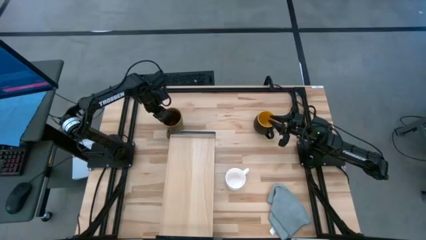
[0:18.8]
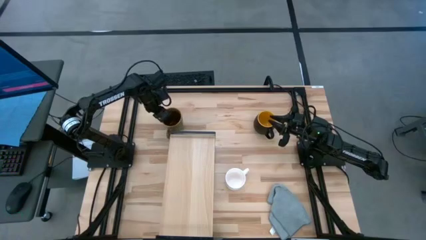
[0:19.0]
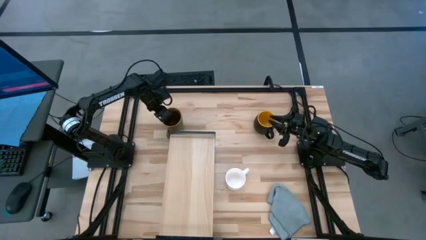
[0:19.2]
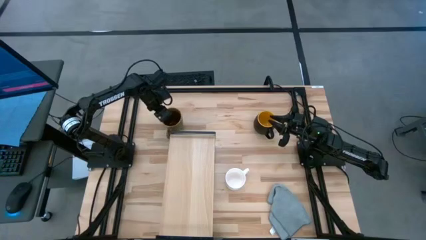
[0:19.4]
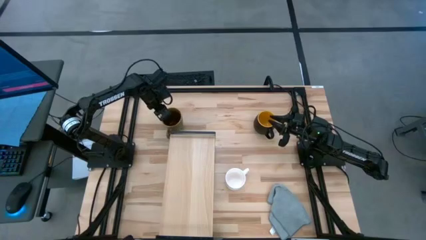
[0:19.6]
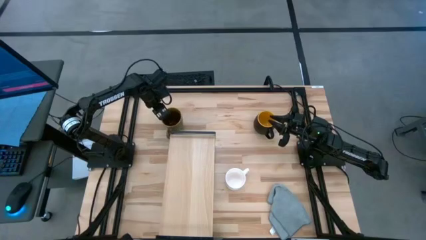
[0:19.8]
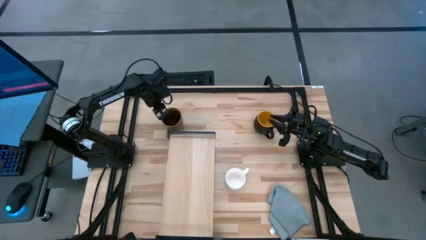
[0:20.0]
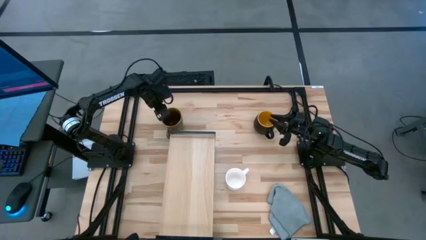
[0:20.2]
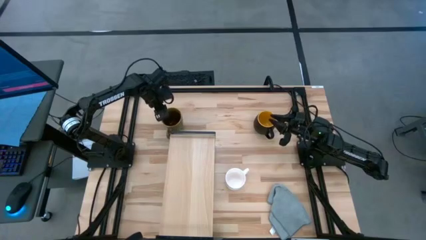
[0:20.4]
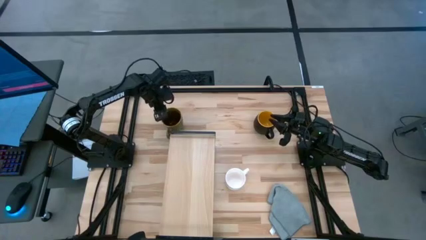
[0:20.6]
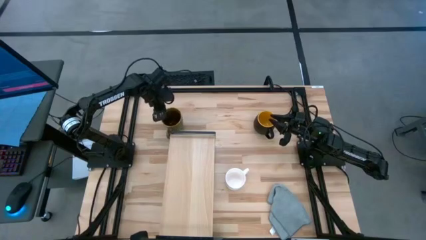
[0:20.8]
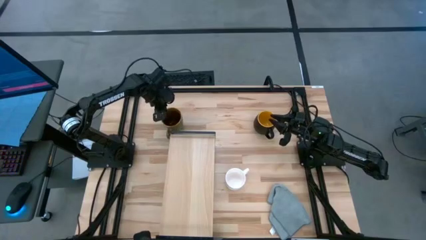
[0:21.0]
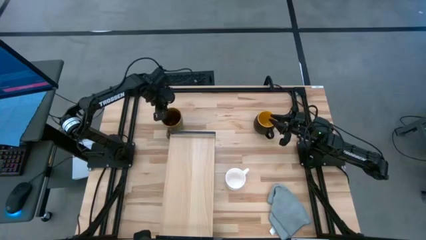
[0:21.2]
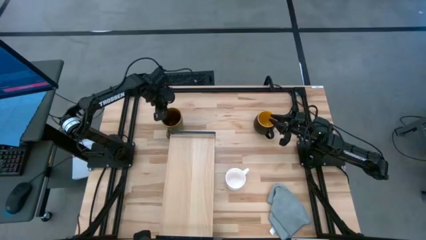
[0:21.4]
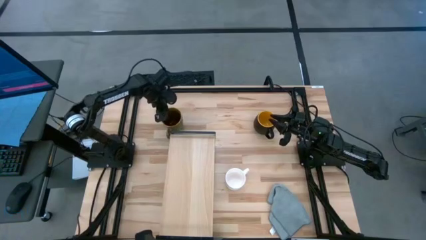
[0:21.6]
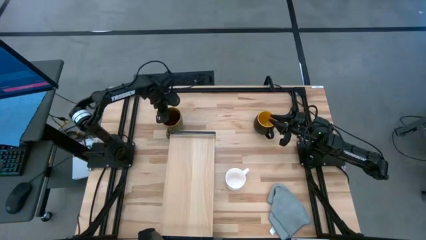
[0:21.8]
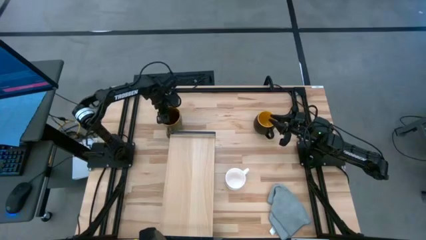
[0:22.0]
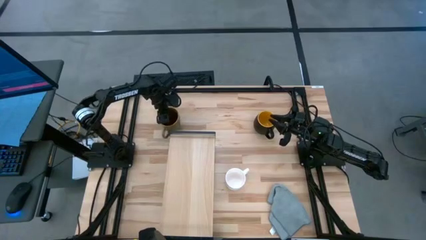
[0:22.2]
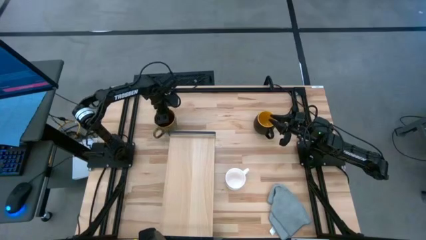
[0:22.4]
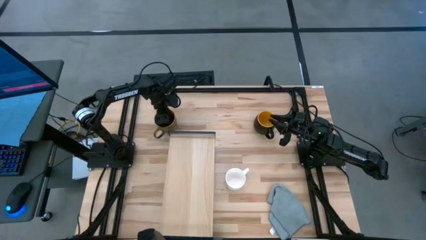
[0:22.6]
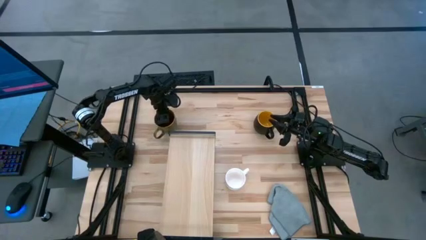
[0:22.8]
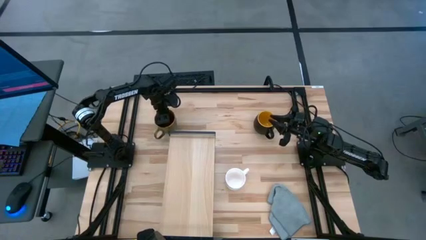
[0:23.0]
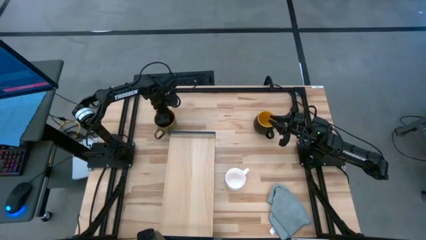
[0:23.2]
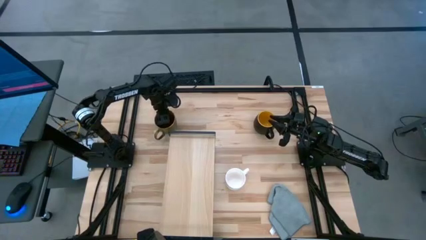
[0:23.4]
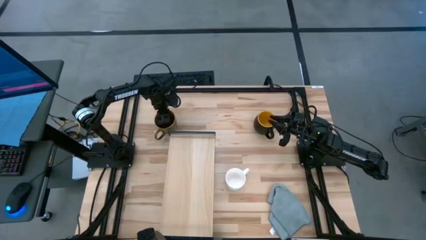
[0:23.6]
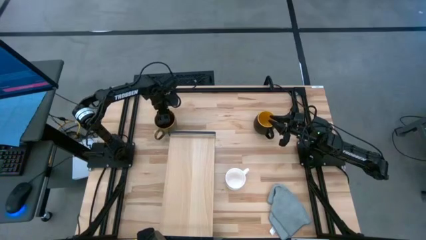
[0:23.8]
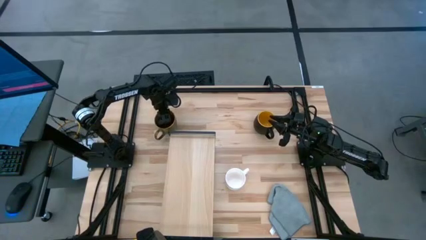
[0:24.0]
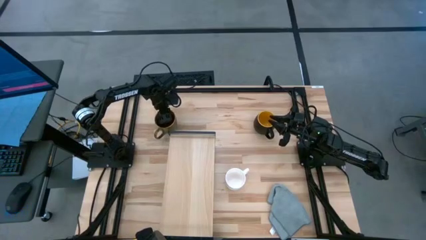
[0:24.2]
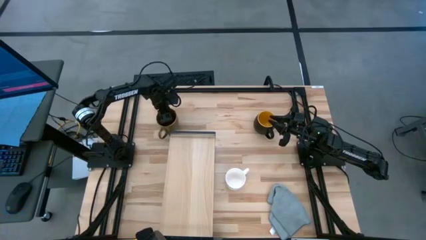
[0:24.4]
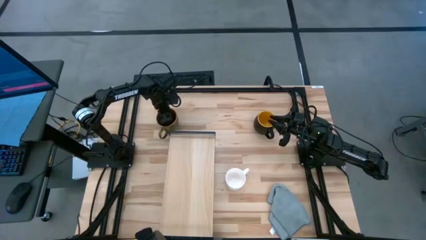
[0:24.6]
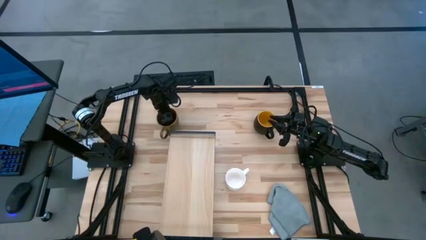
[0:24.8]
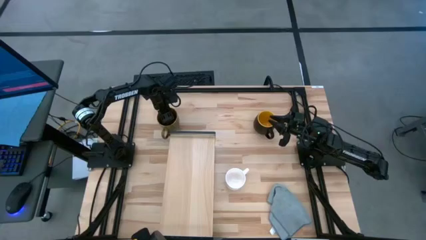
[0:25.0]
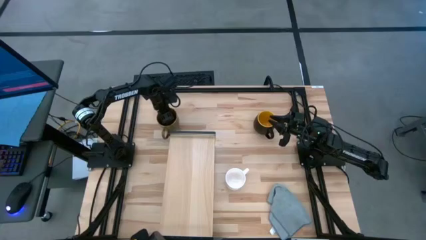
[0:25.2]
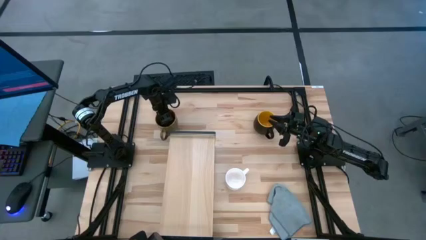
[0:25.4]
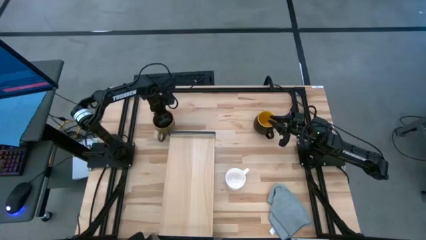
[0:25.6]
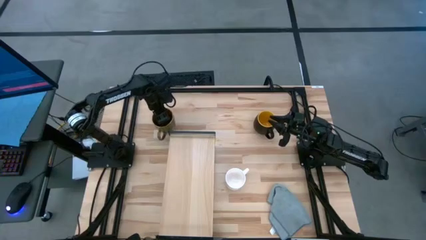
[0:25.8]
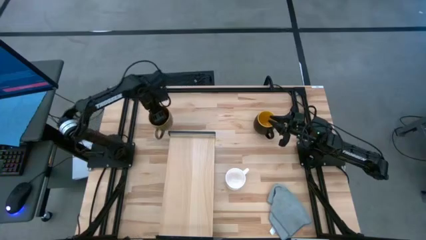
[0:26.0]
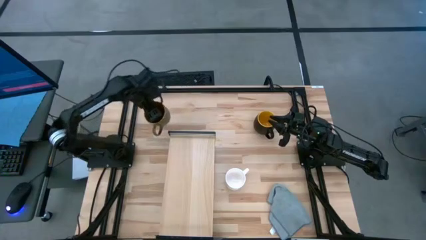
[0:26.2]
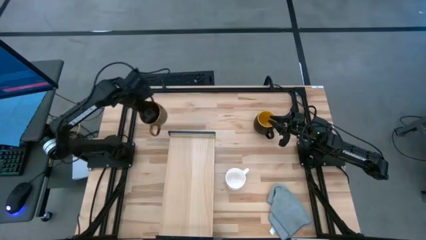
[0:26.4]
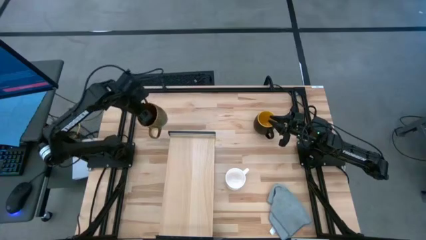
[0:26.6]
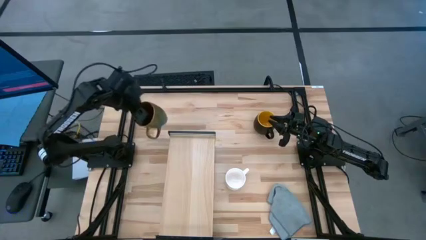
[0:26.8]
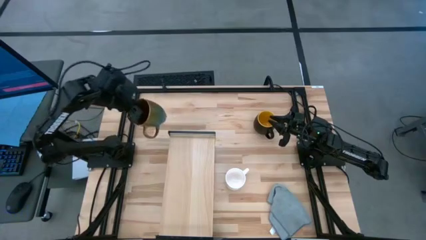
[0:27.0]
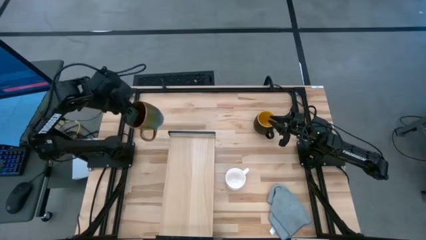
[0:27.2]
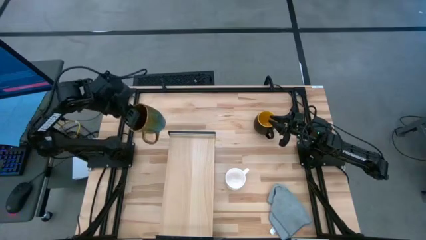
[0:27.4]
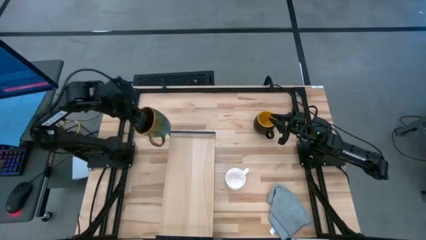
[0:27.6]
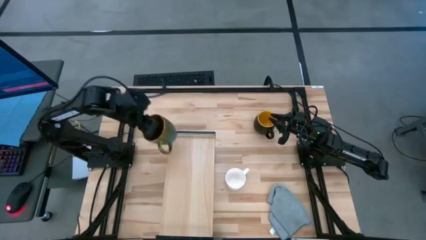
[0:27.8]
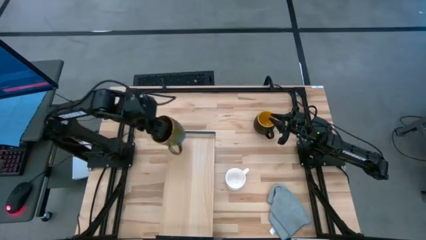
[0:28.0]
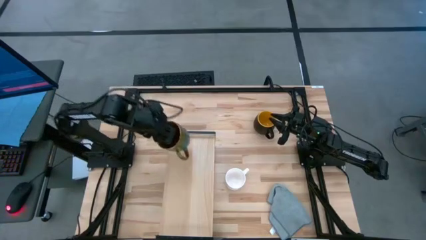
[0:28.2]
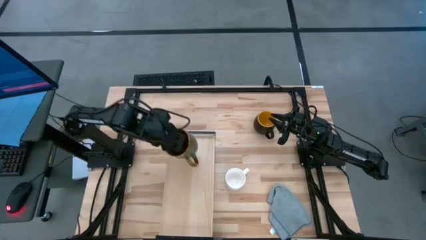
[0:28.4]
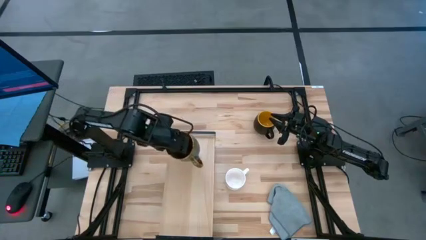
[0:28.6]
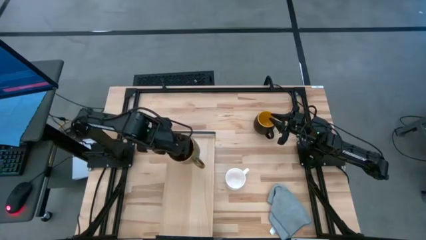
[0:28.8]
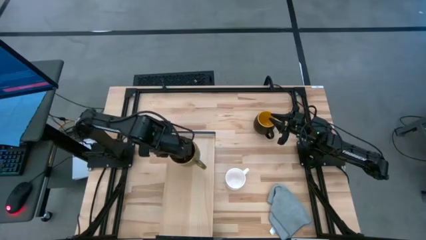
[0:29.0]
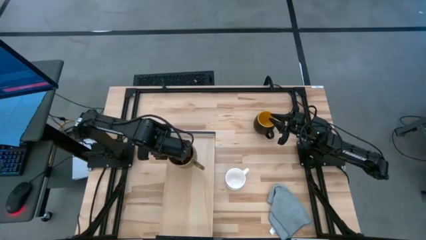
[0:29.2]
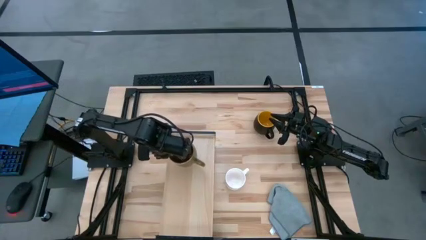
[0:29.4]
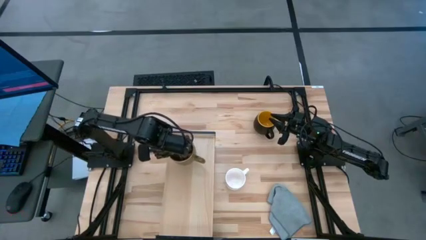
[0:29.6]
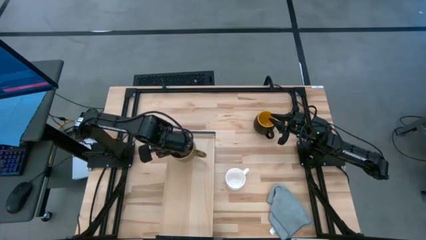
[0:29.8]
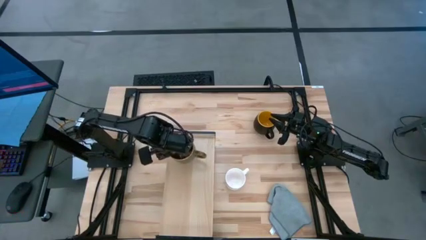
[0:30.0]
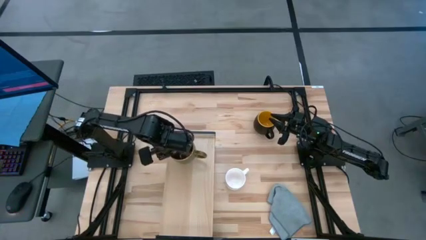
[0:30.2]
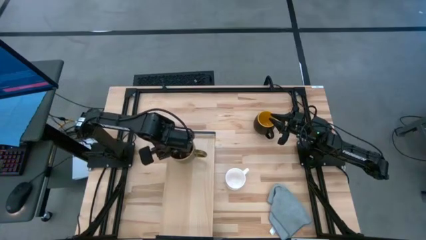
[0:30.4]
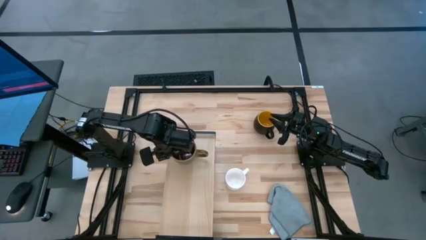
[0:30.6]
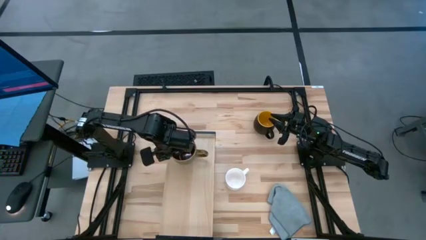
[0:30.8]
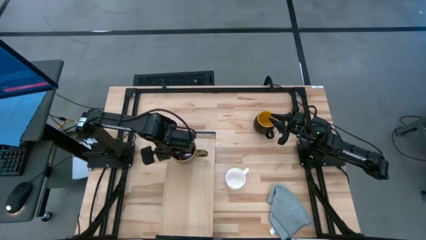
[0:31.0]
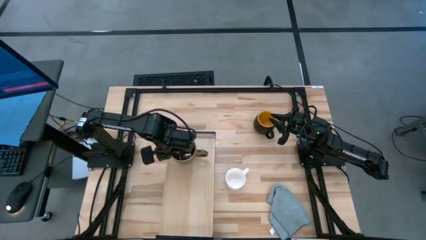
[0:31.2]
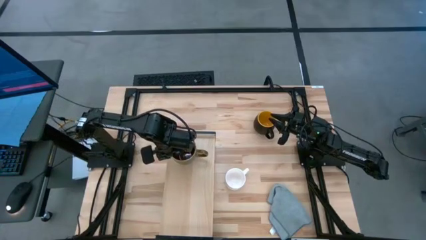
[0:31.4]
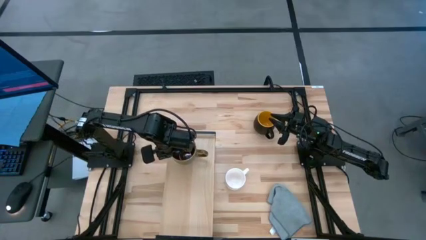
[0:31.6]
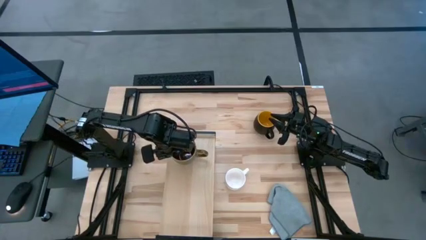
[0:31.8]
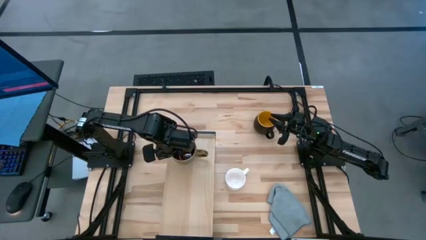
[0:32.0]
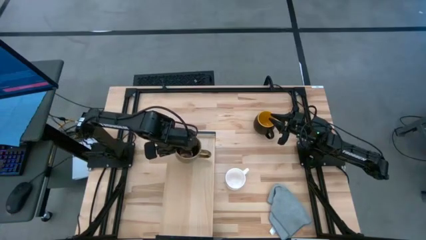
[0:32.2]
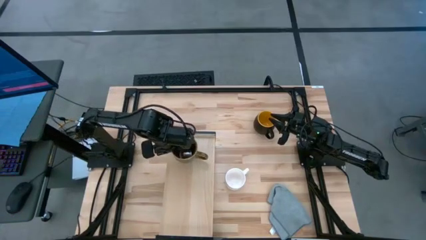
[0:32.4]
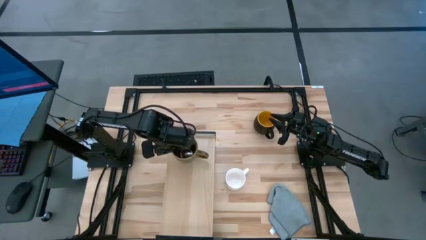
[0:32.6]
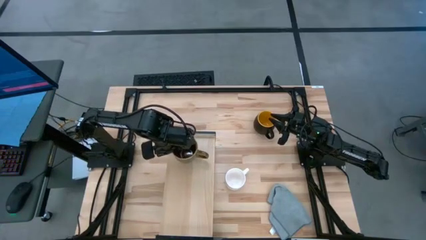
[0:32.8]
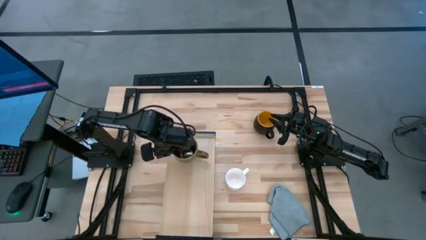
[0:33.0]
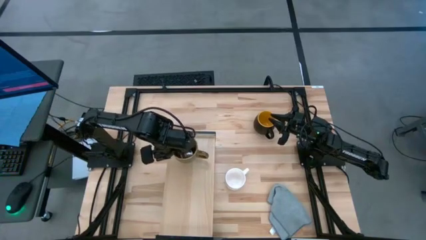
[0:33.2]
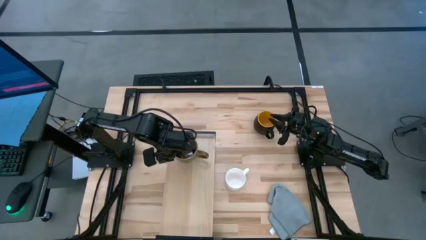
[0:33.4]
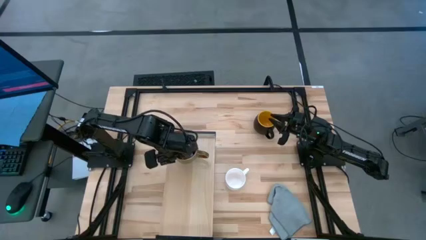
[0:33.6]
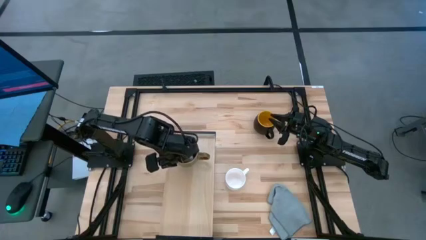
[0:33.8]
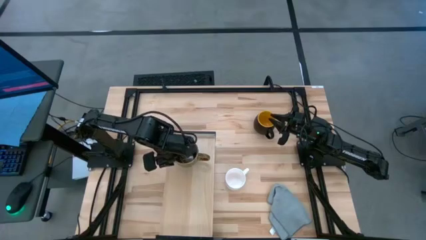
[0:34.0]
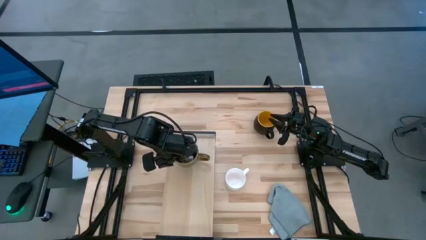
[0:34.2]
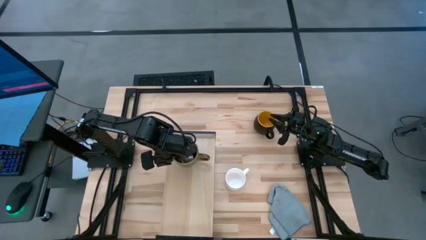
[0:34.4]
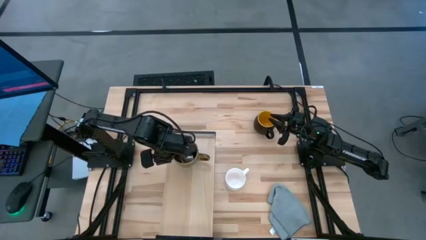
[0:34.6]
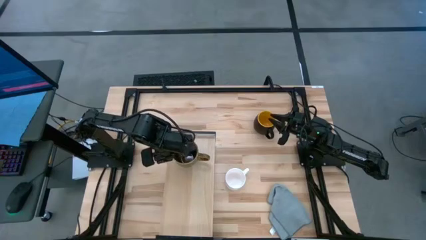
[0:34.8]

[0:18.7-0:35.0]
Task: Stack small to large cups/mugs on shelf
Put the brown mug on the shelf

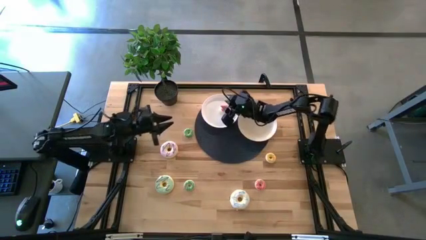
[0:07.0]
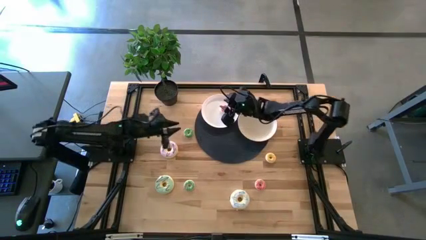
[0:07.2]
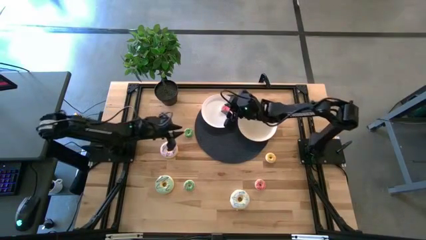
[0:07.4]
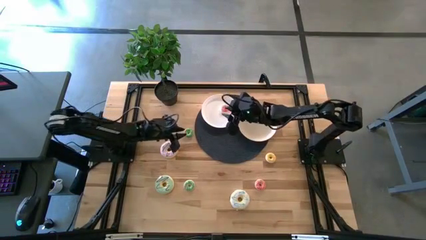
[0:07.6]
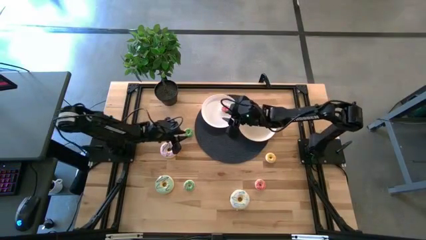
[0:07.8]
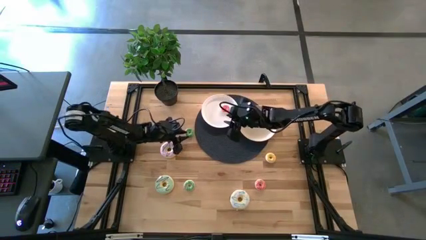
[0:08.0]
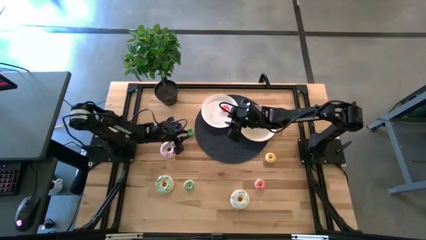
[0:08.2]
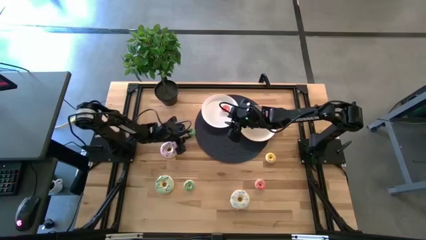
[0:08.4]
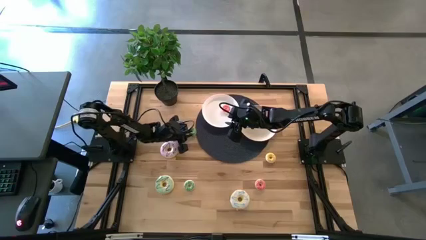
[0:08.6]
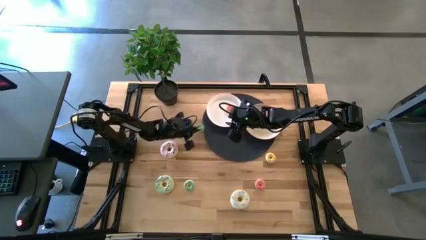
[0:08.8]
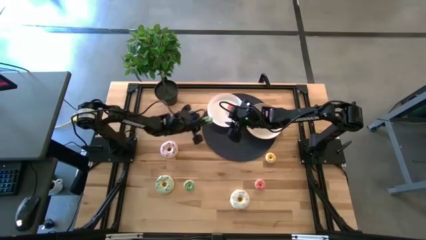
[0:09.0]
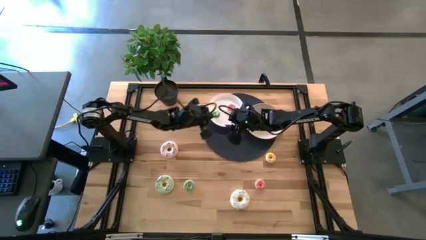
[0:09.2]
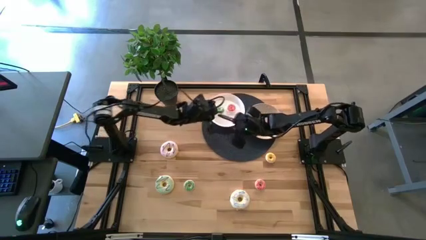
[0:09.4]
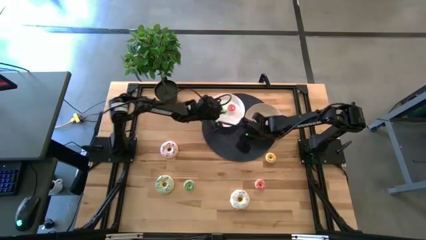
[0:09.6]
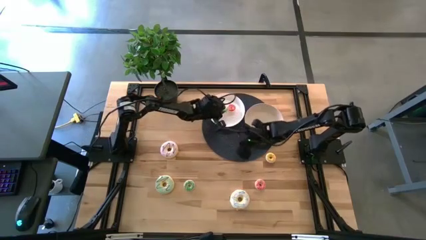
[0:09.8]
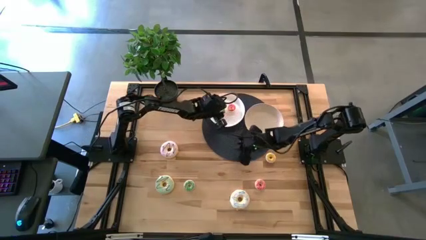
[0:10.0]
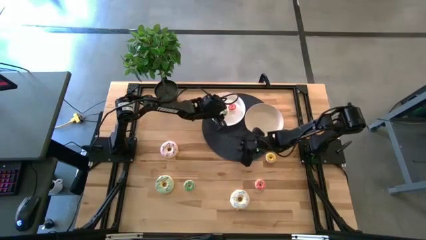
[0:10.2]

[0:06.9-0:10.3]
Task: Pick & Place donuts
Put the top small green donut on the white plate
